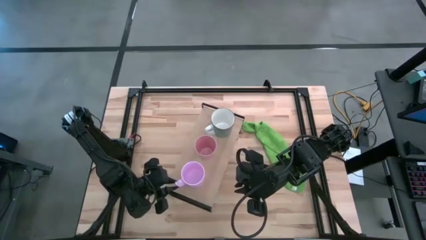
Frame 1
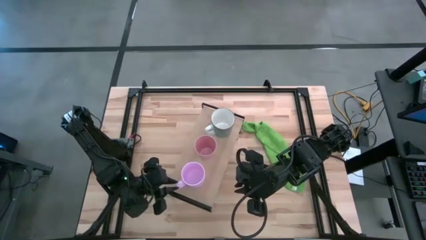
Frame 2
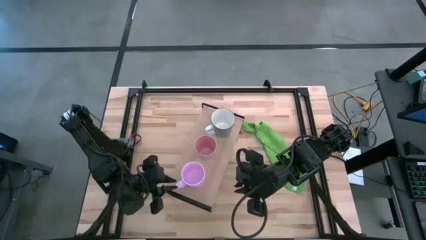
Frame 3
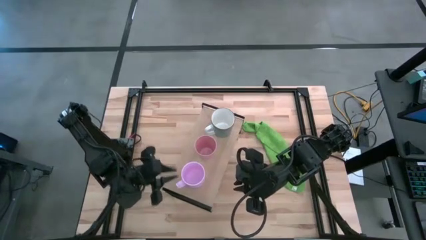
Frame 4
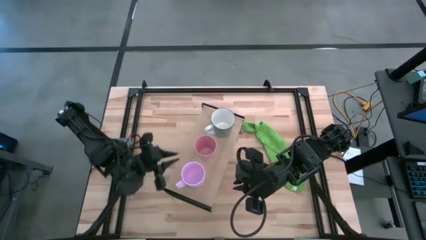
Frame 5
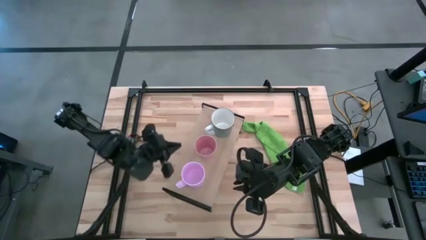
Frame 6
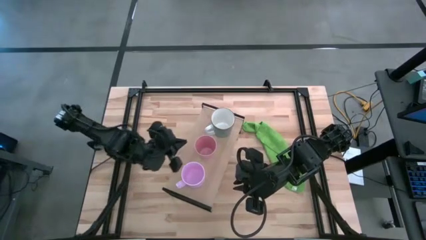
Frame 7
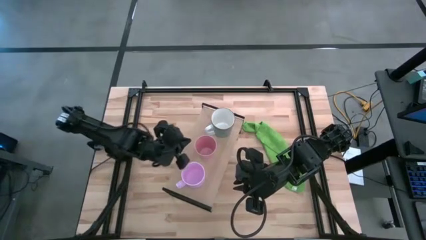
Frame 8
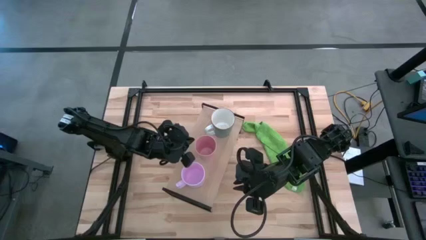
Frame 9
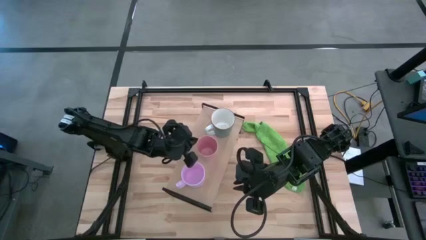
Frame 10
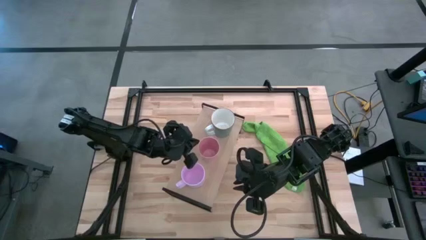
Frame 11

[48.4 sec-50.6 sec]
Task: Stack small to large cups/mugs on shelf
Adjust the pink cup on the shelf

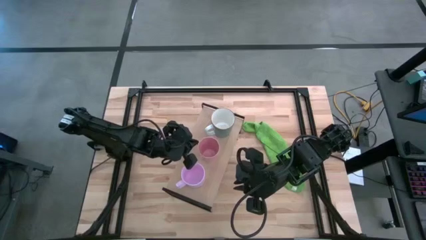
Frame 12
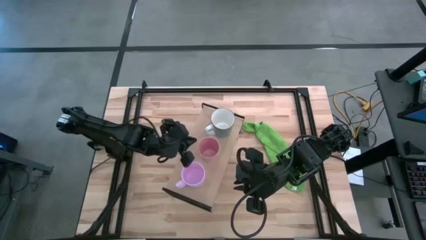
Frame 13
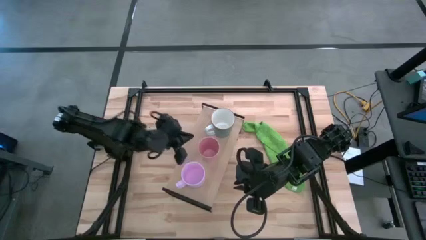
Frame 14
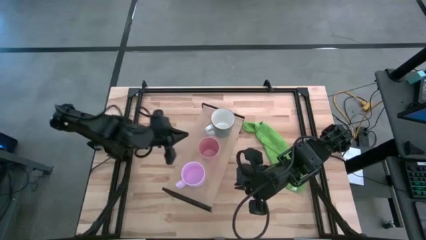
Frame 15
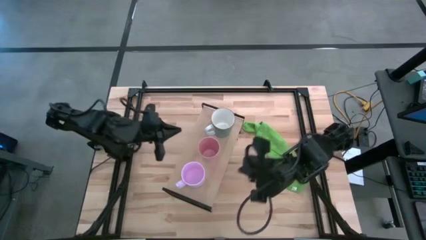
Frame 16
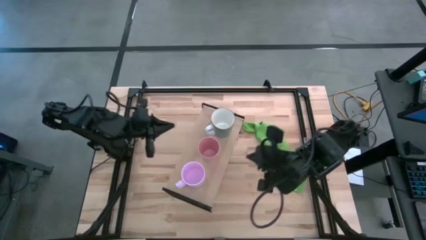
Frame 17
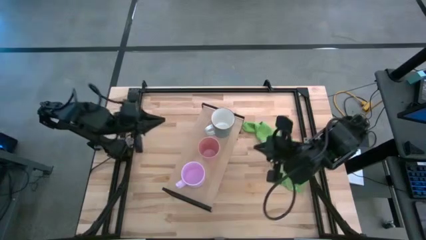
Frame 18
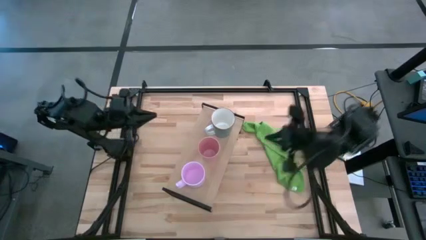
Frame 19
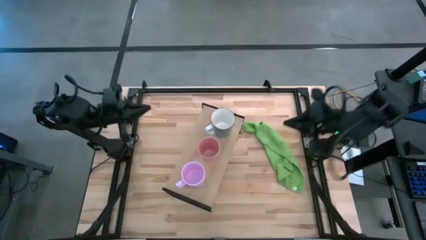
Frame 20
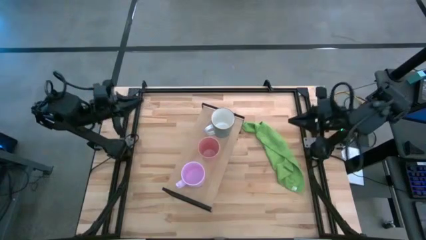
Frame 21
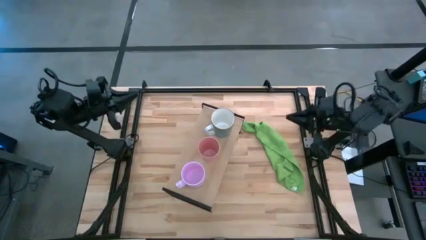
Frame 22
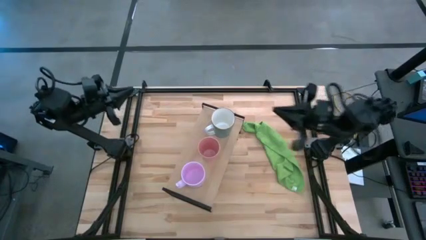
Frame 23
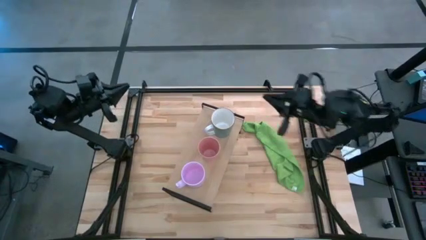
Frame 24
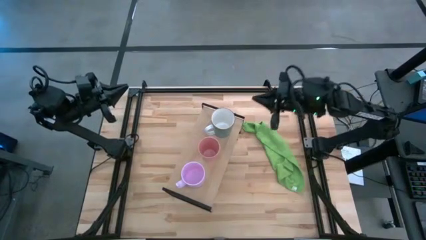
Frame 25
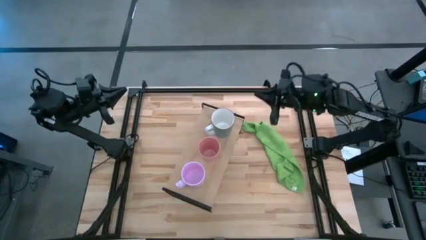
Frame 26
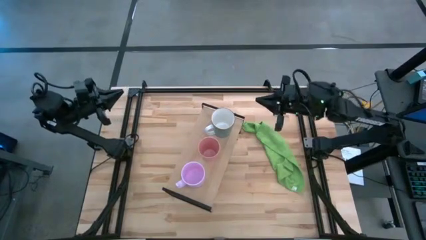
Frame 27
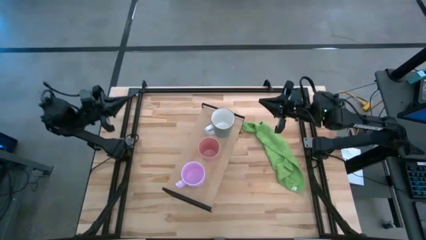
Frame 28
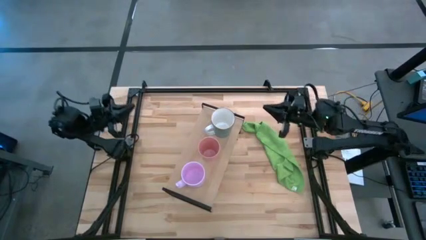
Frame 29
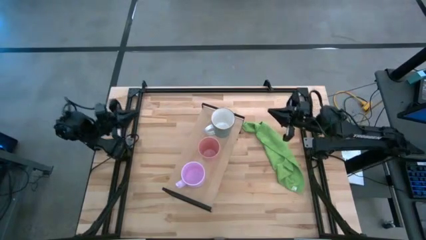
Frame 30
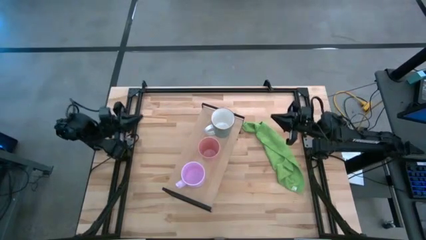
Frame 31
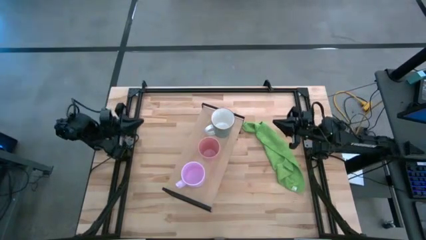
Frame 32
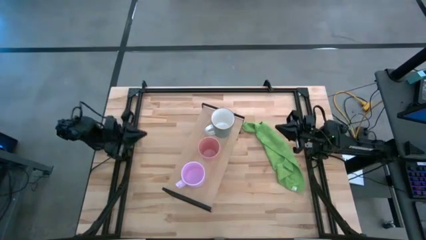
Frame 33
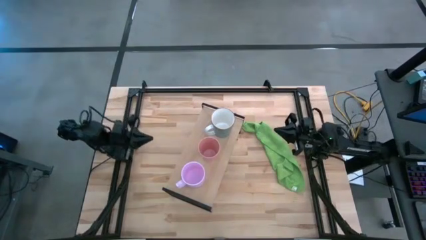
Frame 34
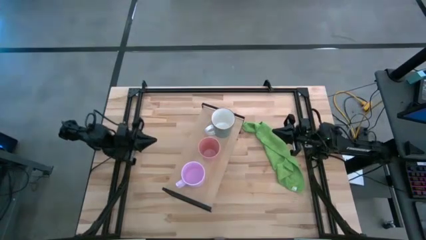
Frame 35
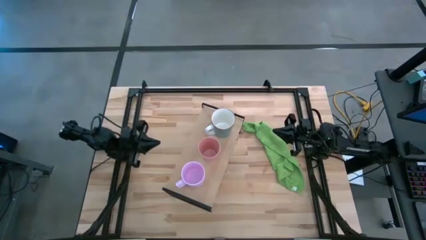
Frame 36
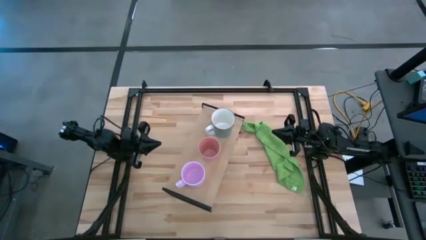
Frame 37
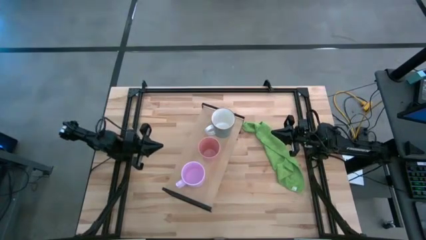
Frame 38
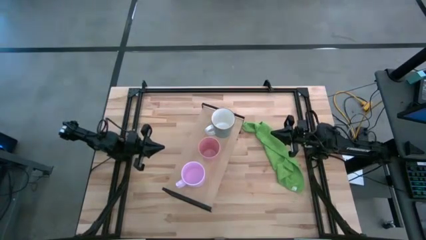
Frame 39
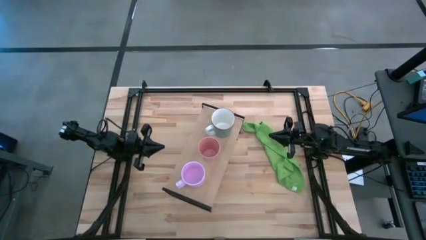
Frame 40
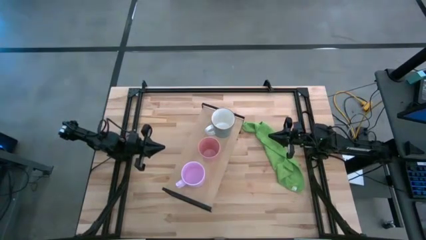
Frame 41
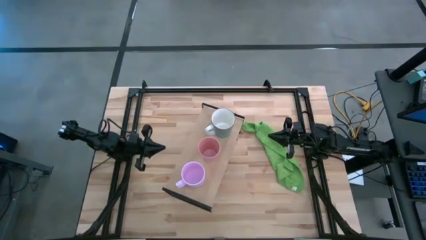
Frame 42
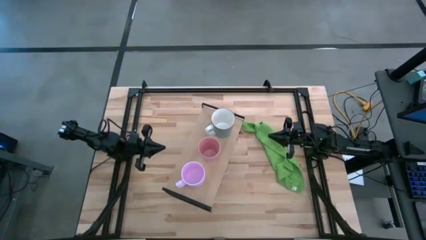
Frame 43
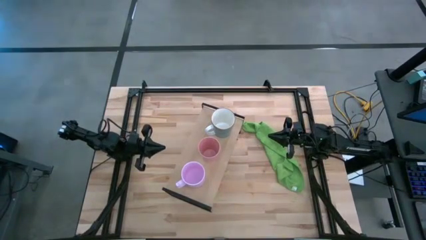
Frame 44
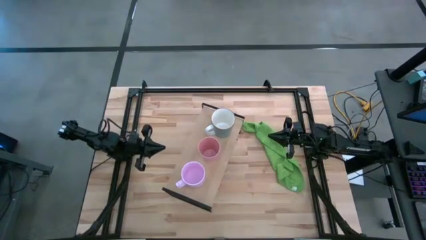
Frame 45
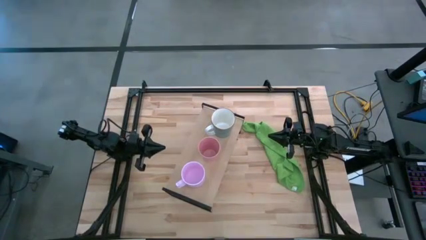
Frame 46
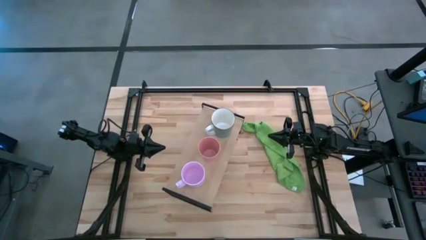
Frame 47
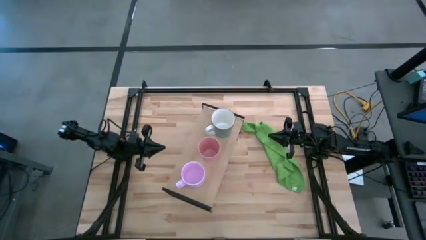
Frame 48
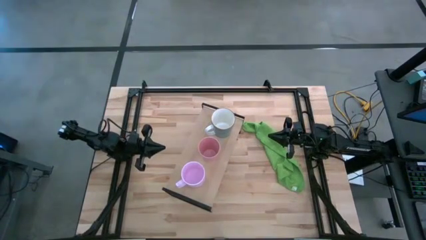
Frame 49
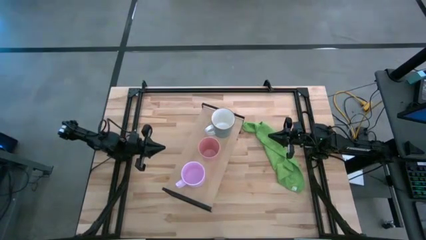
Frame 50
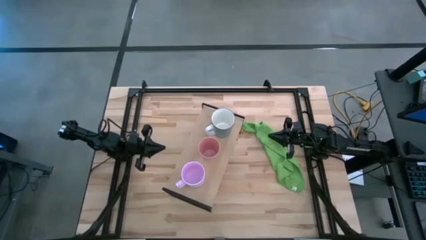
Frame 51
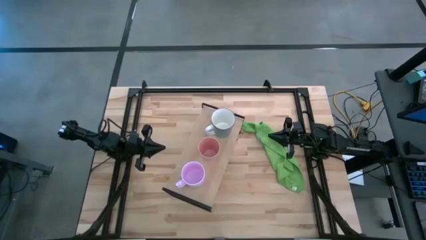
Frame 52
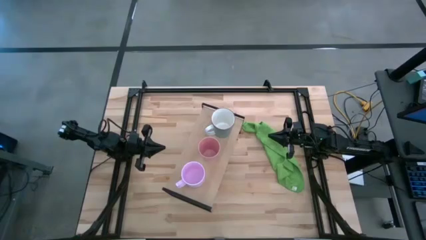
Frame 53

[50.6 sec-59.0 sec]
Return to Home Position
